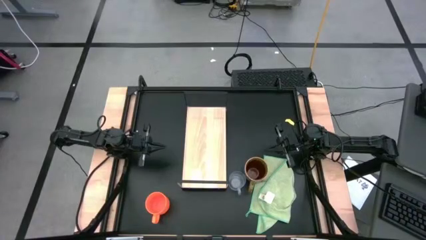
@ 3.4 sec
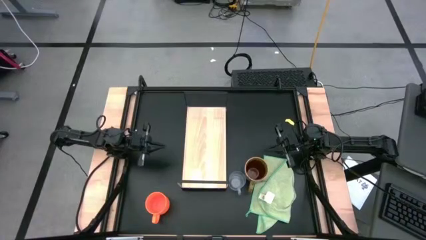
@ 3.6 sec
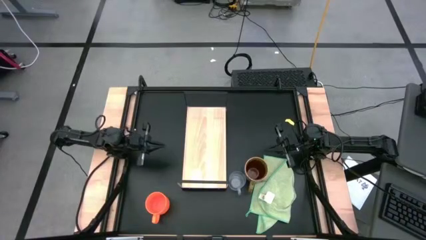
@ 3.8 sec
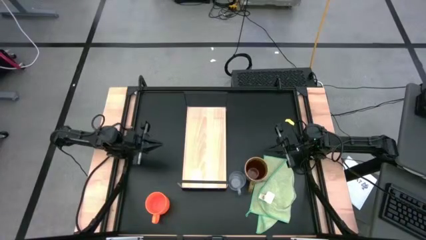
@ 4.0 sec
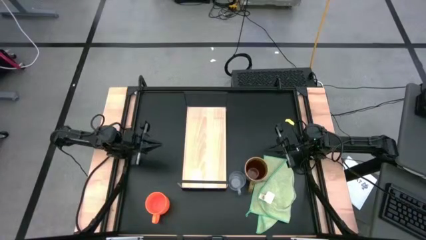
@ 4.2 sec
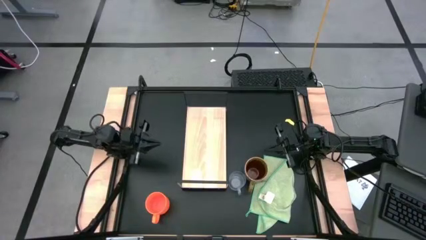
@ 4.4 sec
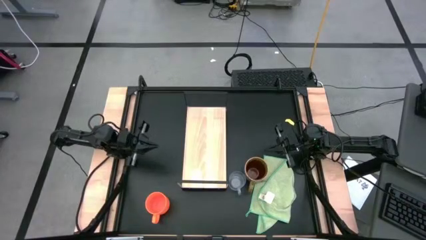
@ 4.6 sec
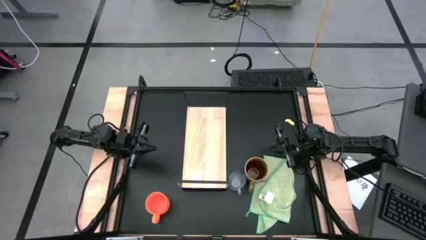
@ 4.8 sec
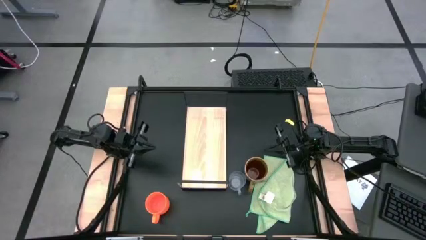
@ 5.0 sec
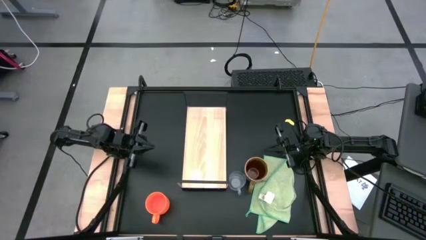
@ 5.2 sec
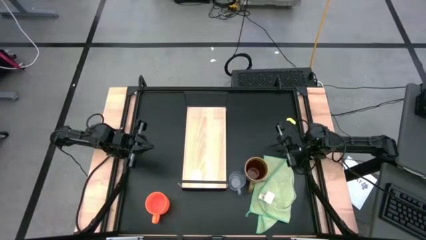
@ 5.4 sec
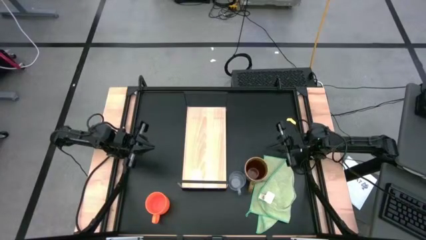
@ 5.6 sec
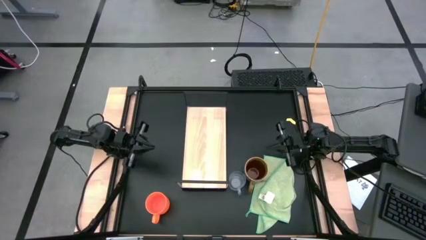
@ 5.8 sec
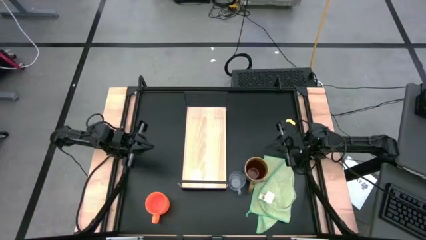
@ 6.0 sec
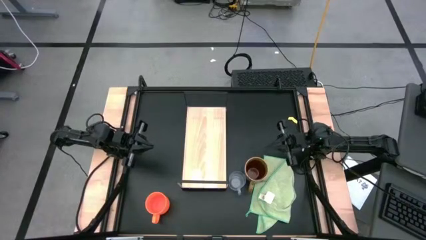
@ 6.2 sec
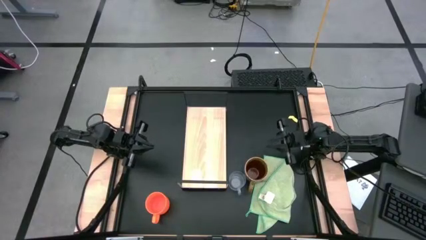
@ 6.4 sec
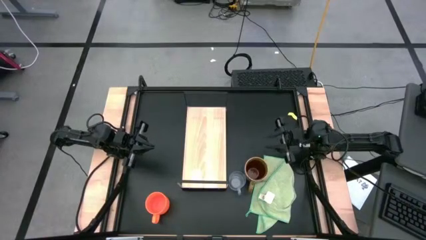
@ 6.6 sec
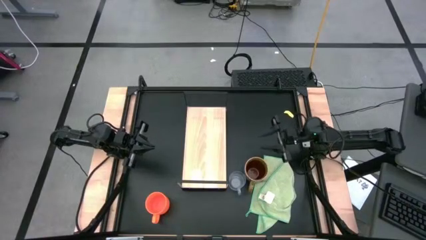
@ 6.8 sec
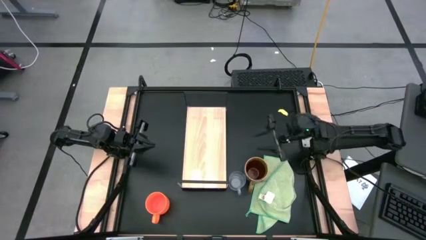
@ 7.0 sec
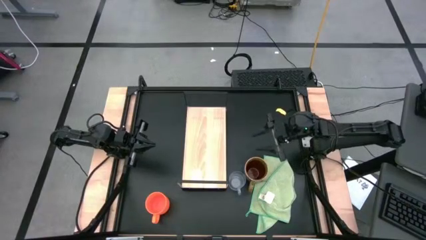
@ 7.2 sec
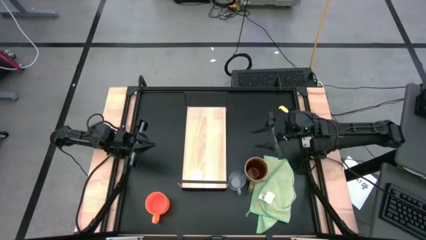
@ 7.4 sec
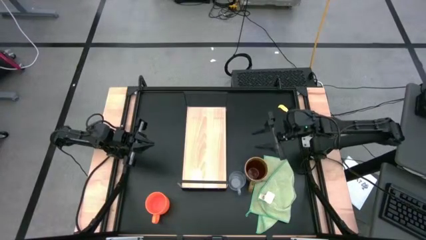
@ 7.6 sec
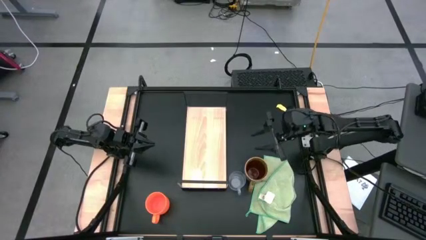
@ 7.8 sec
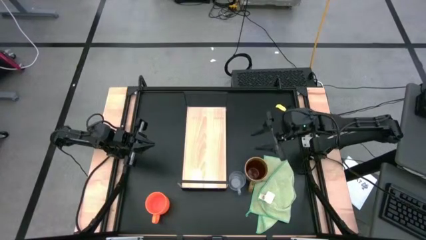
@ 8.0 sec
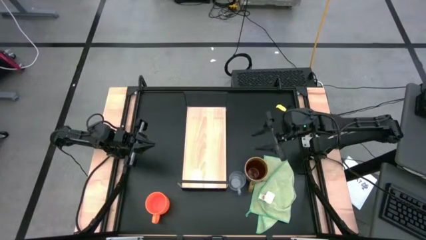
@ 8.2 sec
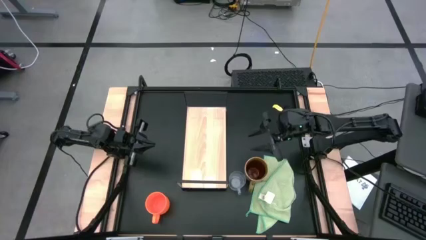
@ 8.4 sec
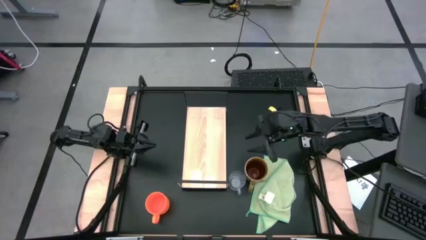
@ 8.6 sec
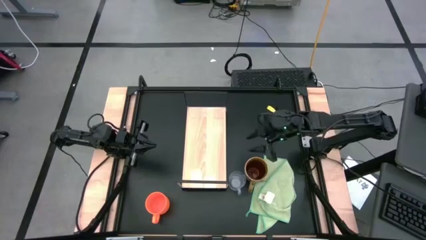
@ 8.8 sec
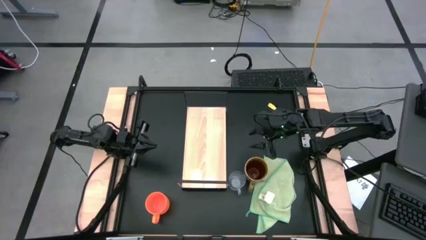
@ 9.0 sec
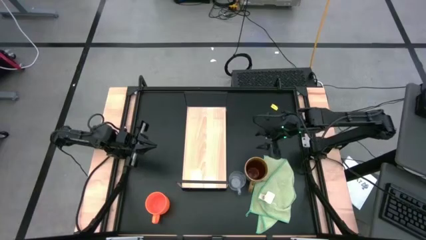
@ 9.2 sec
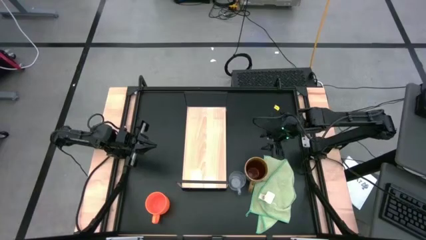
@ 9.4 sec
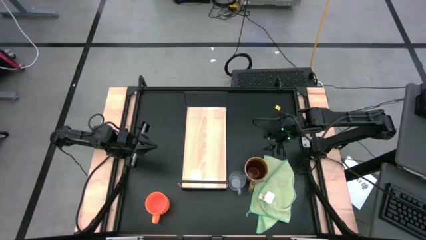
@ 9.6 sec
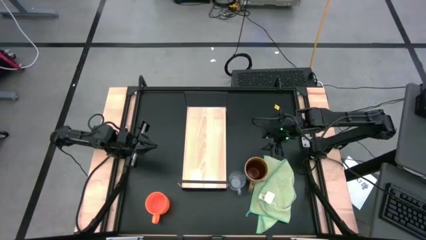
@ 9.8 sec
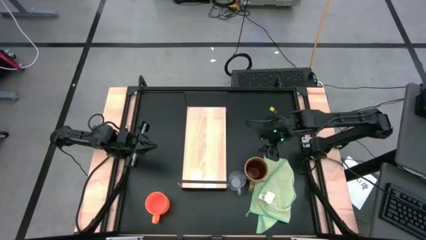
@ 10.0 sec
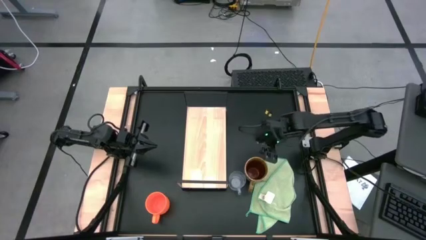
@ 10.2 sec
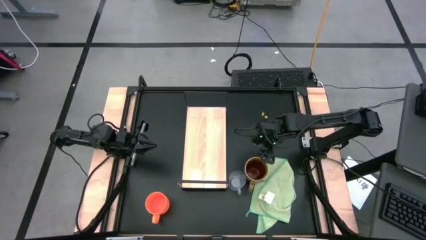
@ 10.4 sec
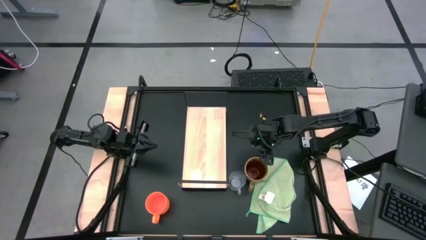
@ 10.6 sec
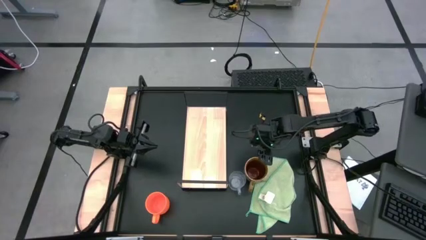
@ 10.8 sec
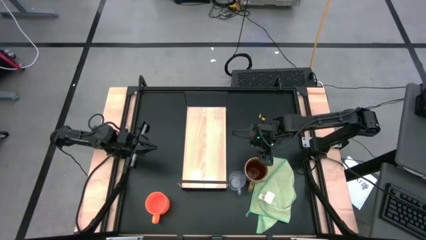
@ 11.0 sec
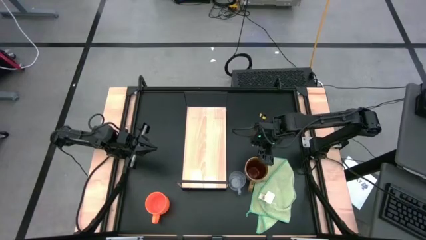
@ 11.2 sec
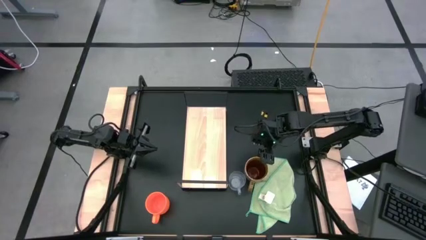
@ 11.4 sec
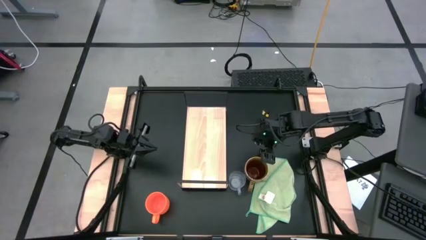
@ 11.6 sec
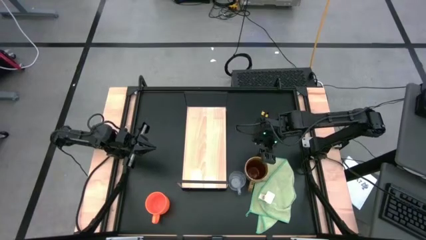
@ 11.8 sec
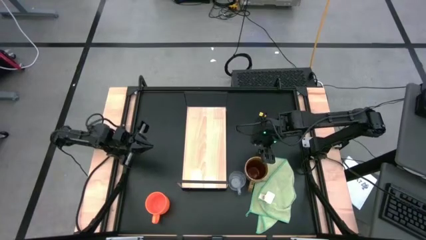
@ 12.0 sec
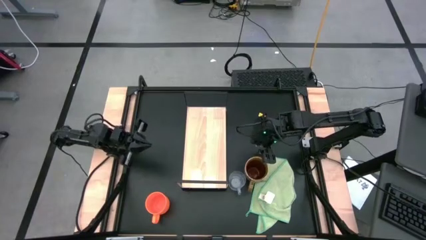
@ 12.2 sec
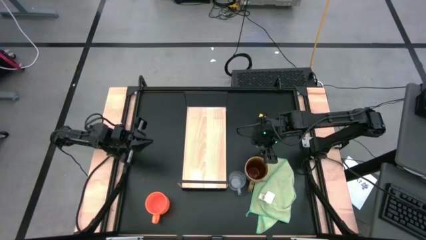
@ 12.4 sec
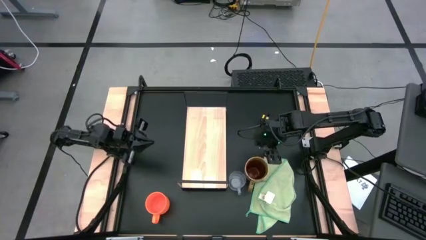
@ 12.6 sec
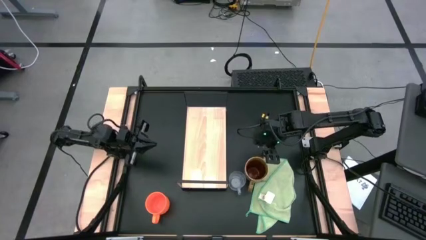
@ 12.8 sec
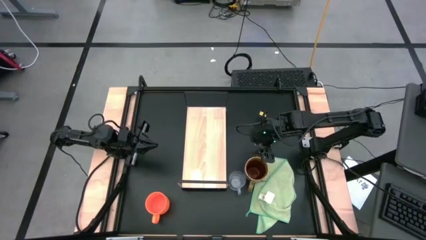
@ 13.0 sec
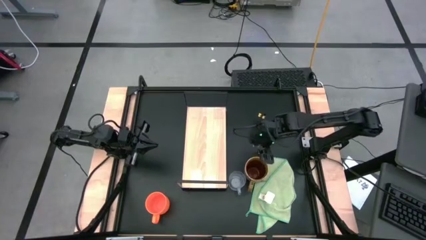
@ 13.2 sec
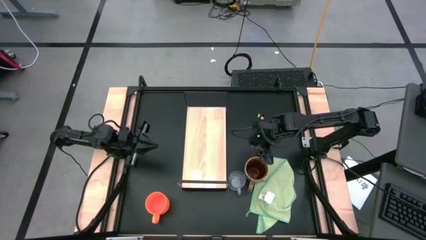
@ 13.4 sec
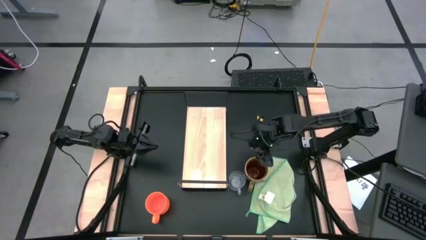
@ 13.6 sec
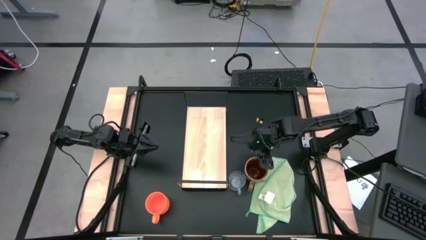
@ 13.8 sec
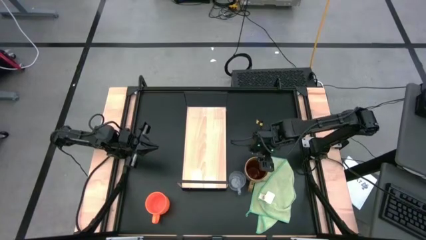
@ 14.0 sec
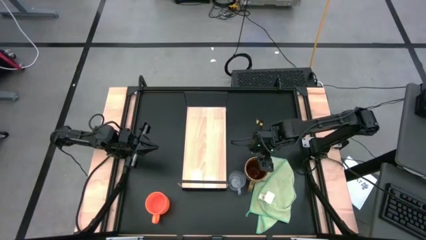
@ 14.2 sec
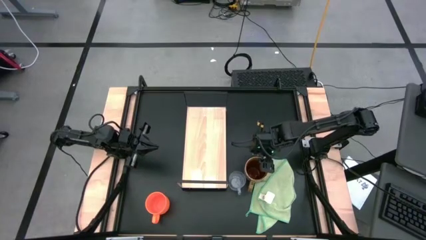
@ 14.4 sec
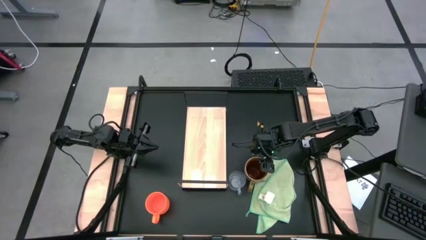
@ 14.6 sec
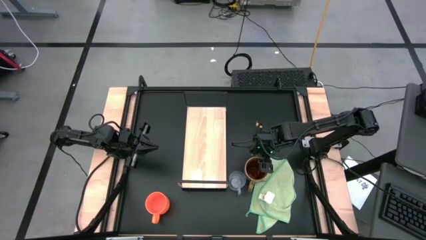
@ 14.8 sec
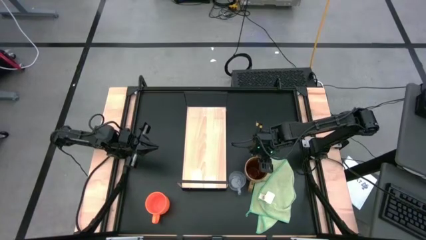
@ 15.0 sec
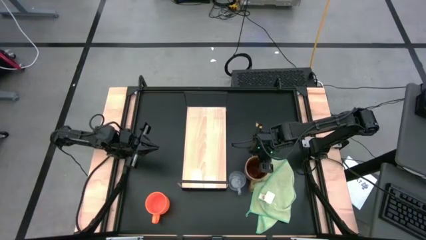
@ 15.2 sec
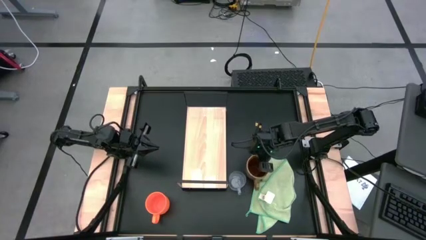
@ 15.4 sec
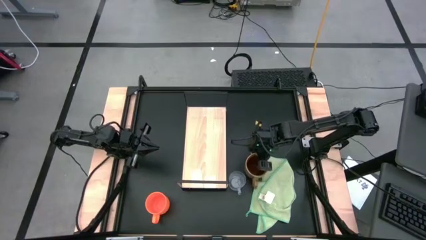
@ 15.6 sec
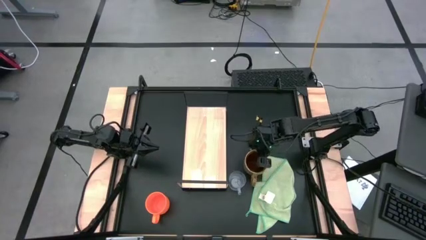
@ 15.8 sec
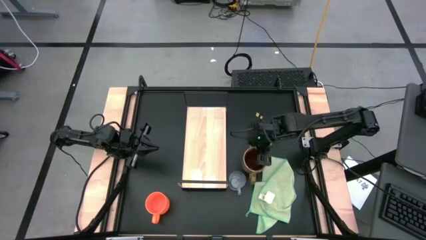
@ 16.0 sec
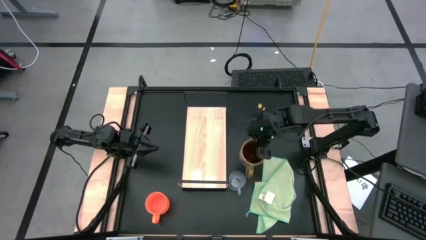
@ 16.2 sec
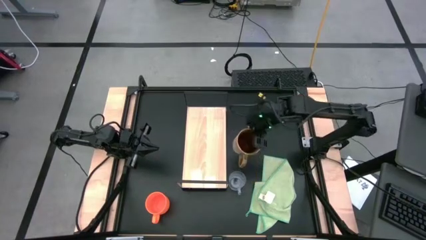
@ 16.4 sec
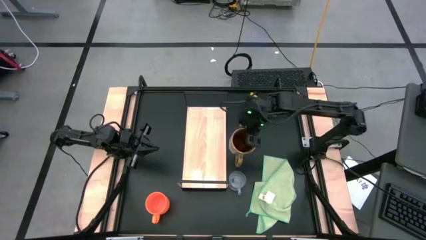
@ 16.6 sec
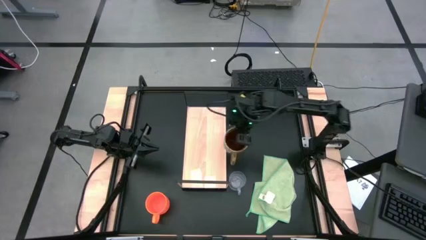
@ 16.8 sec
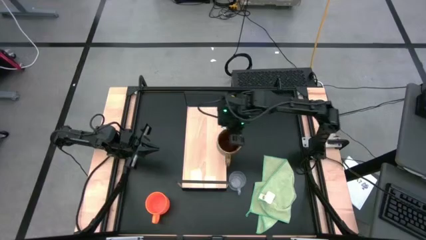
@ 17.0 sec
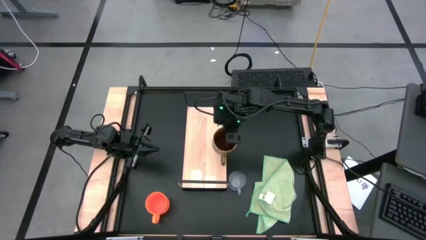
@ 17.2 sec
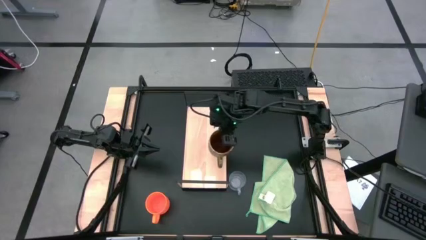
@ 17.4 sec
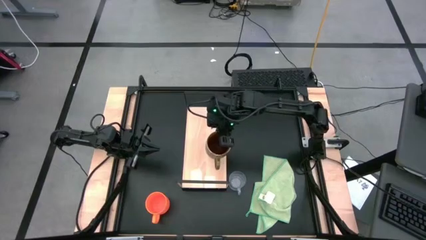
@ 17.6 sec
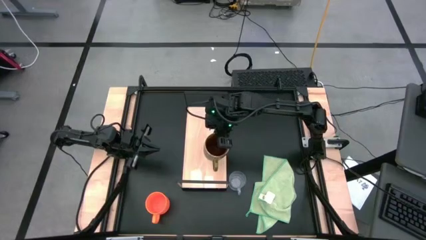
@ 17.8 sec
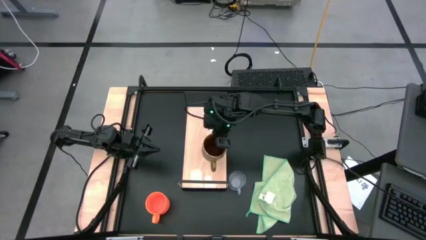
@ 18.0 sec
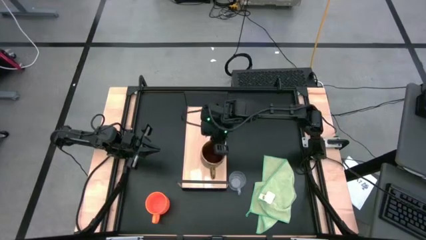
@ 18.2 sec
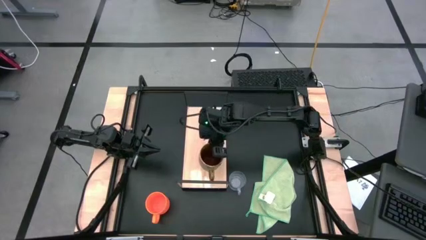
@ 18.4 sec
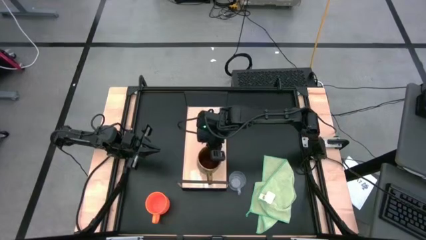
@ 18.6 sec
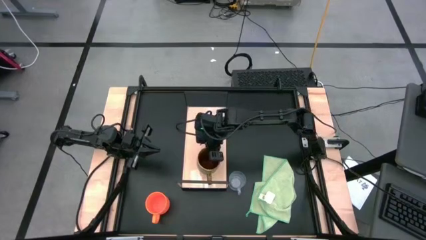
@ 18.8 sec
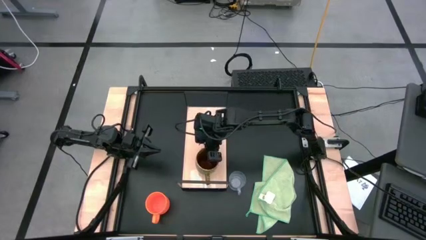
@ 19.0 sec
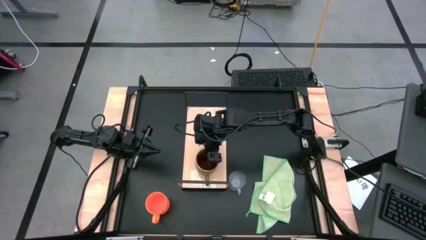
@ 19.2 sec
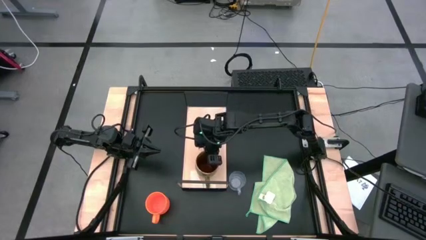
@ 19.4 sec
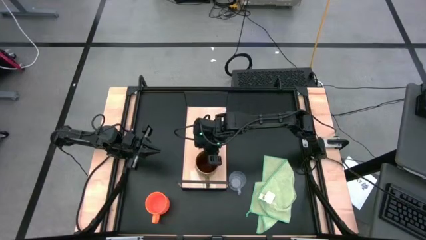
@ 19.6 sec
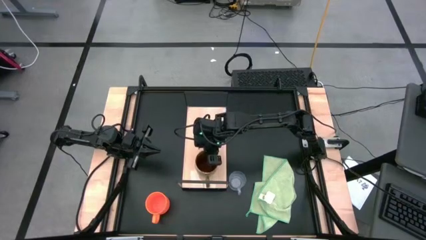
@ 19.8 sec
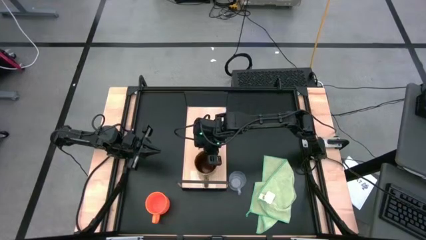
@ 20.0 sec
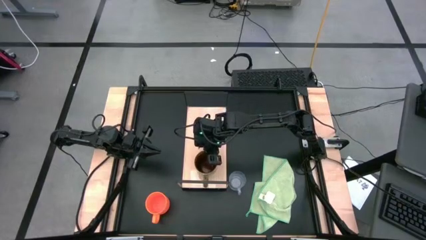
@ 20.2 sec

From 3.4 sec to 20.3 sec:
Task: Stack small to large cups/mugs on shelf
Put the green mug on the shelf
